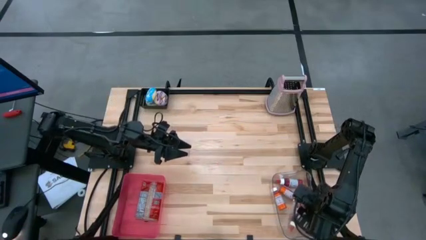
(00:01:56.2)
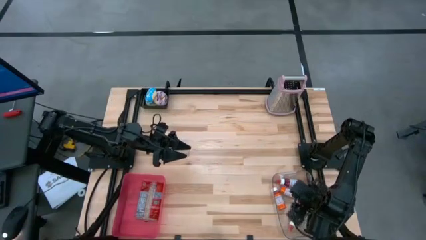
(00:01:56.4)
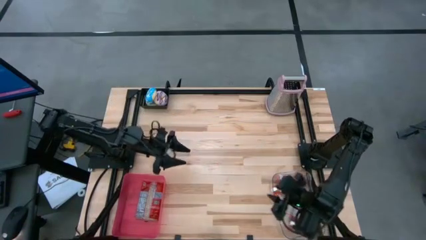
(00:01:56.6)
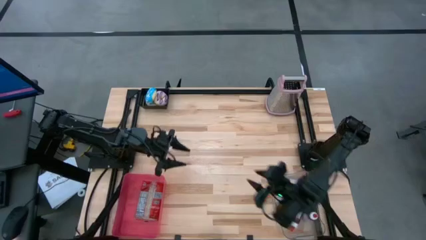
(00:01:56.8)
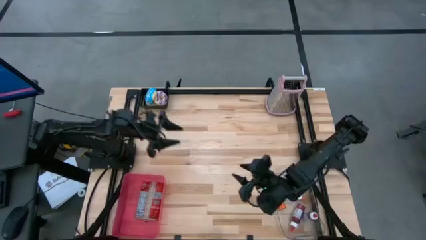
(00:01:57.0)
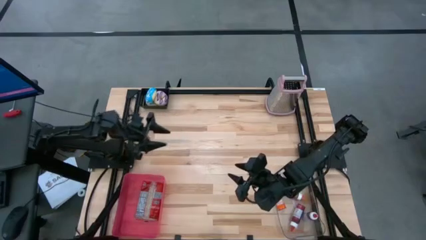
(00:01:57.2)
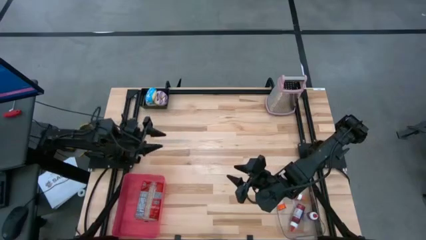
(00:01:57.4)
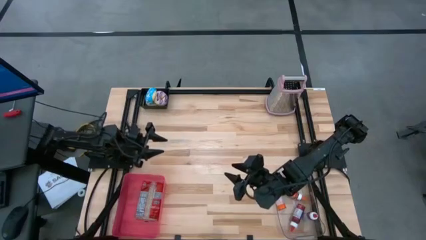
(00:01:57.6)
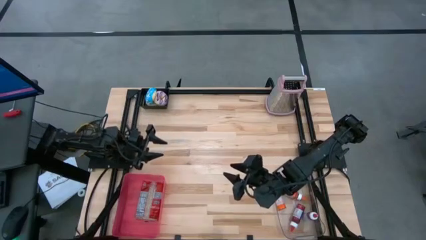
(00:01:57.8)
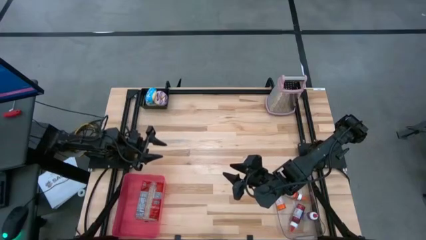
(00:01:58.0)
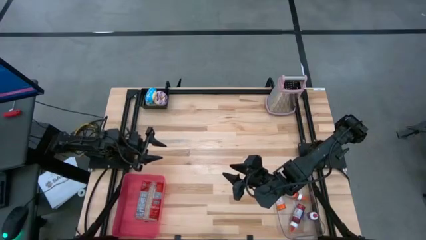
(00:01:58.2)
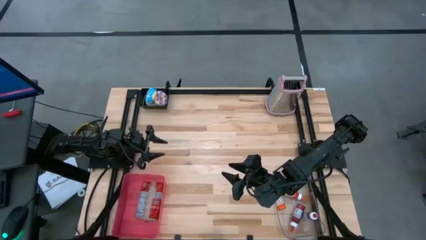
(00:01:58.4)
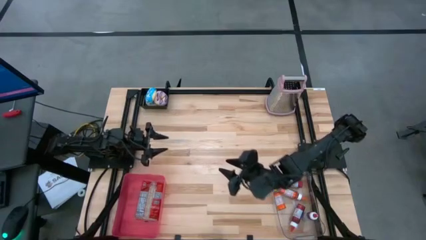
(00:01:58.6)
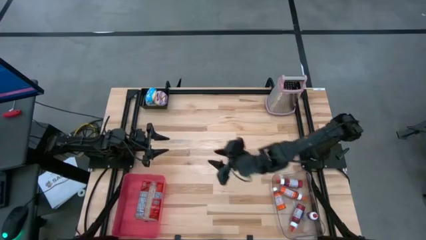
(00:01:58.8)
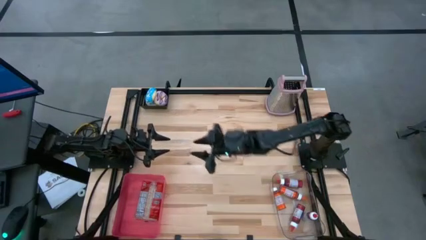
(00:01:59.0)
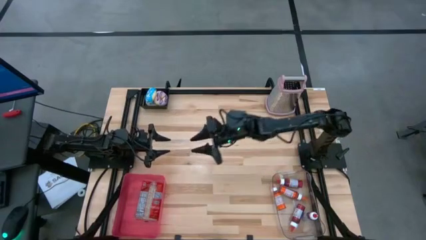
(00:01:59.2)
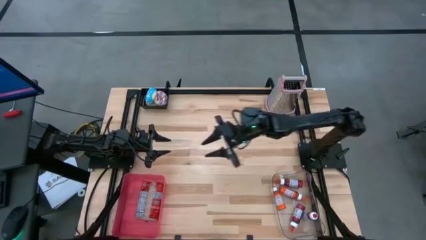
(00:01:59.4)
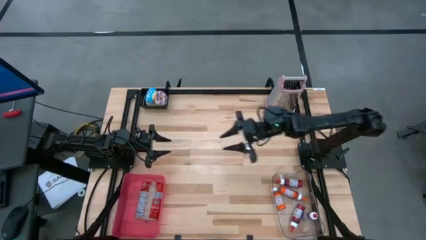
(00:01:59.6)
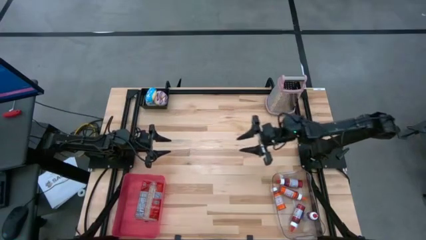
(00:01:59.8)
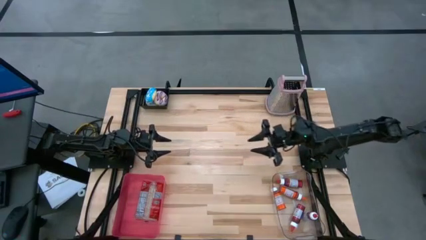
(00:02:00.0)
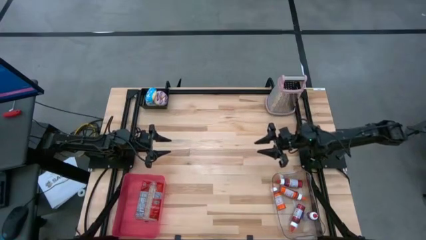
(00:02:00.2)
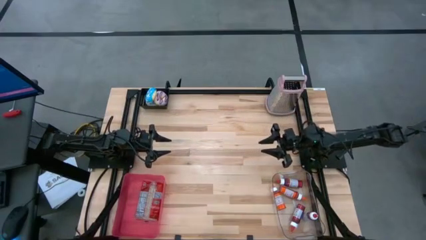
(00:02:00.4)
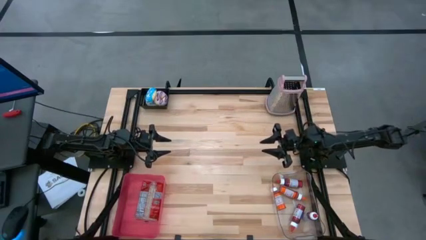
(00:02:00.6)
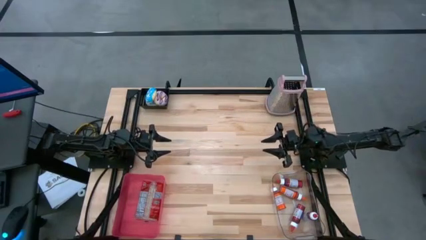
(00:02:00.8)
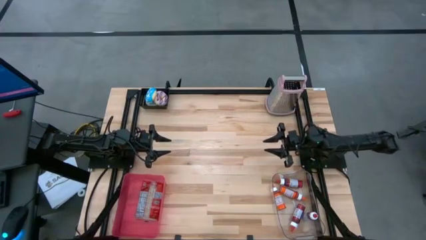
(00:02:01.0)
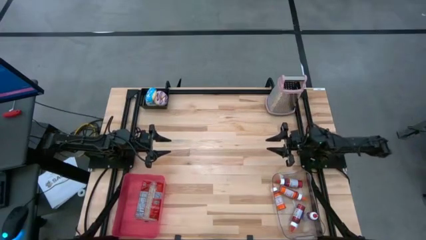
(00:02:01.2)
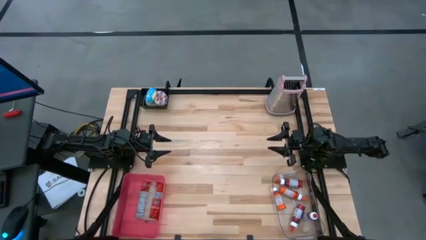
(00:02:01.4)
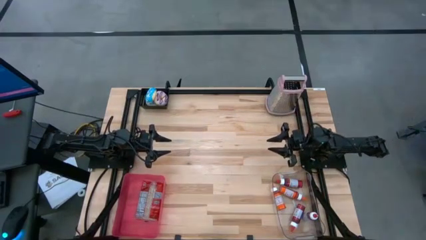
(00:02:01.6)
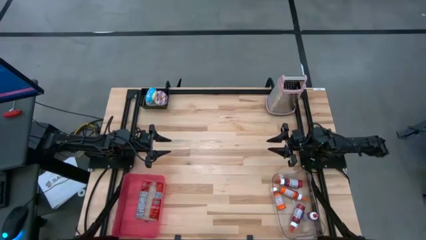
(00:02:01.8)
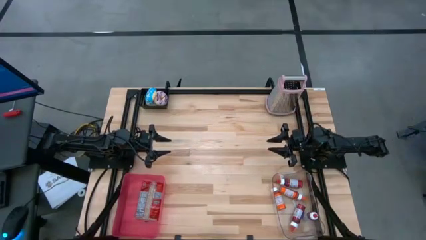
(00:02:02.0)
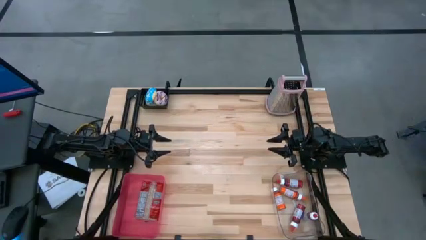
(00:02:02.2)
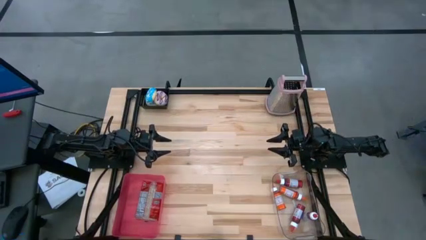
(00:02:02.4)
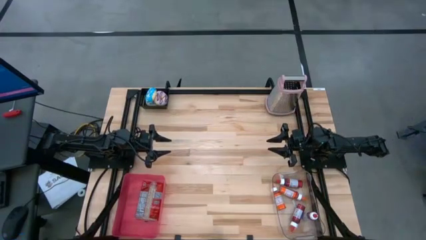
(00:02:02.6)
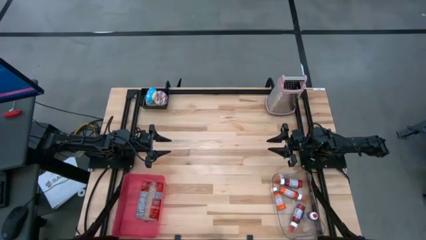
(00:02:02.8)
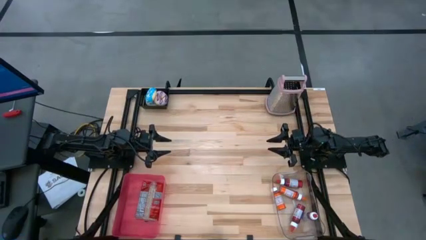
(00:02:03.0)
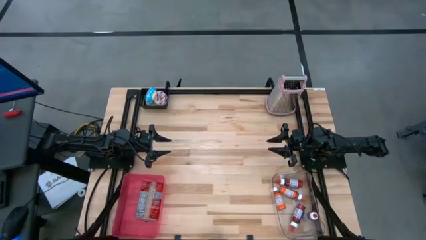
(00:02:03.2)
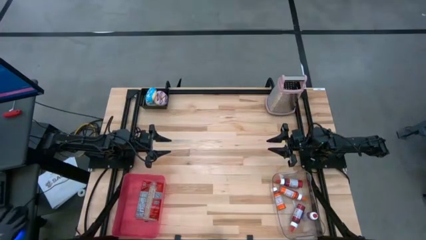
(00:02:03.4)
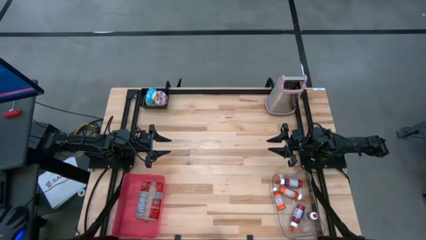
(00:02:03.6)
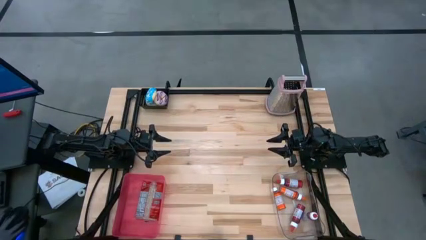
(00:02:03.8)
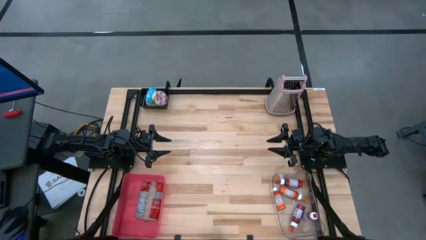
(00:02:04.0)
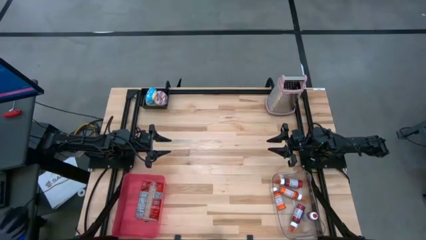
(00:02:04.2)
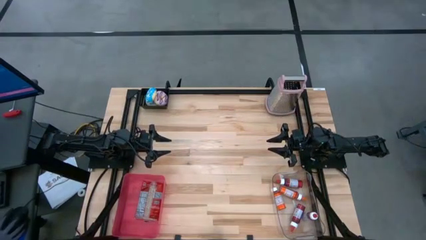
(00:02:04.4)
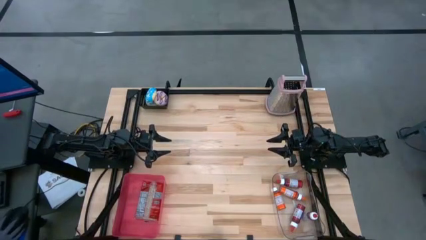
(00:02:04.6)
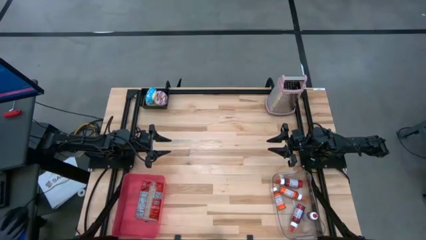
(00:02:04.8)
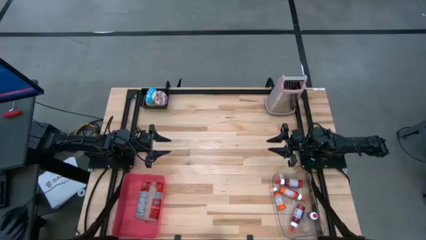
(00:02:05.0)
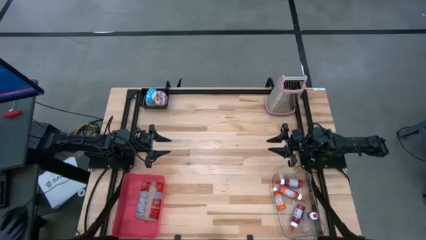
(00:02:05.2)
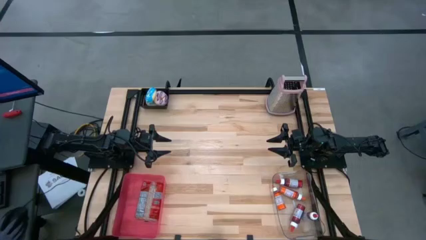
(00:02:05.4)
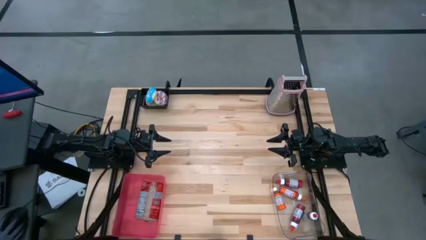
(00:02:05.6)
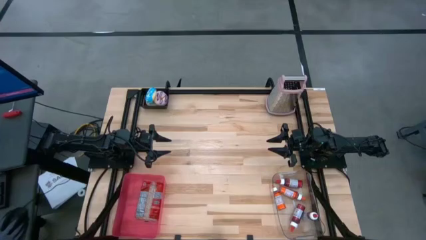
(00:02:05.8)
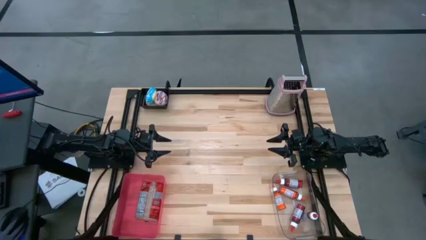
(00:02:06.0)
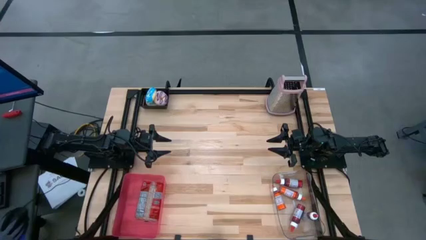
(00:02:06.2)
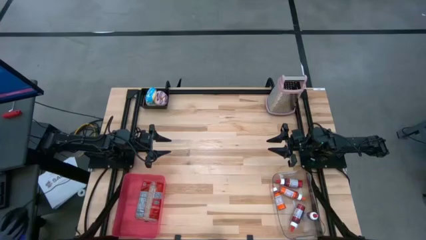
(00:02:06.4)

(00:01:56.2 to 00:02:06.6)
Return to Home Position

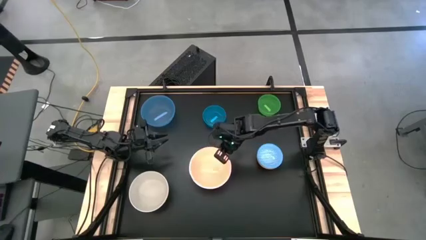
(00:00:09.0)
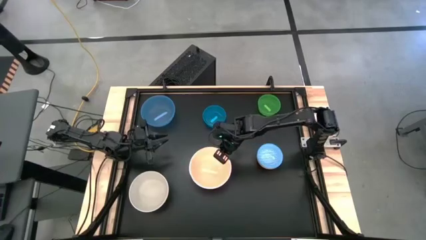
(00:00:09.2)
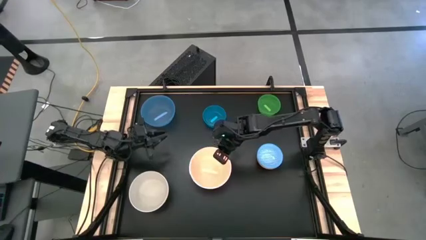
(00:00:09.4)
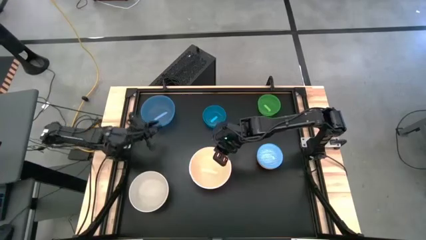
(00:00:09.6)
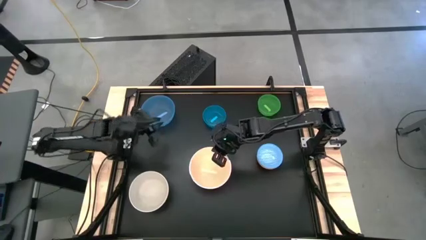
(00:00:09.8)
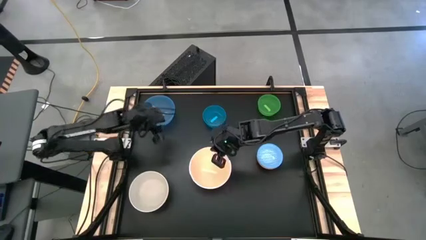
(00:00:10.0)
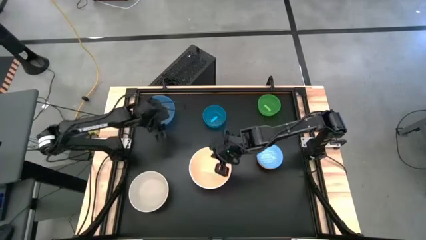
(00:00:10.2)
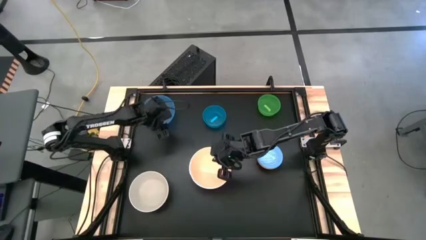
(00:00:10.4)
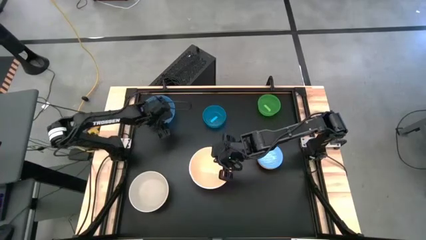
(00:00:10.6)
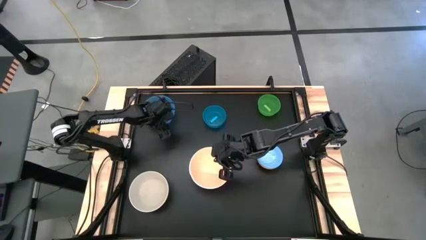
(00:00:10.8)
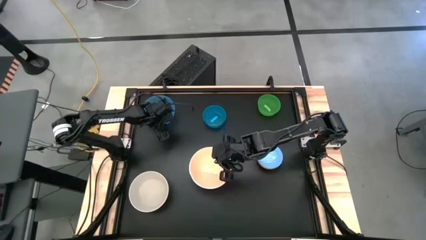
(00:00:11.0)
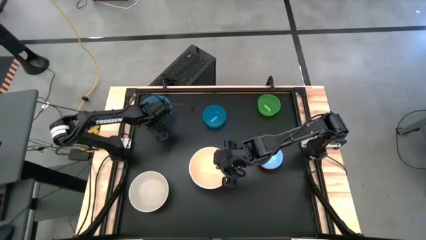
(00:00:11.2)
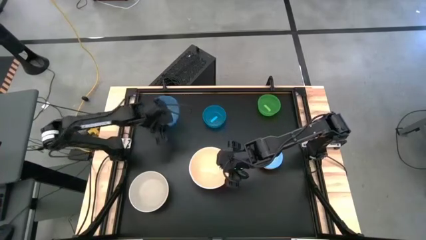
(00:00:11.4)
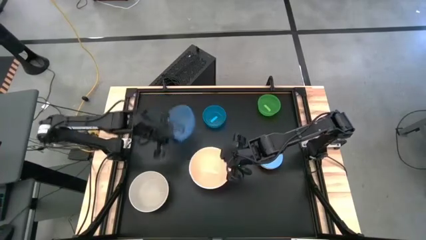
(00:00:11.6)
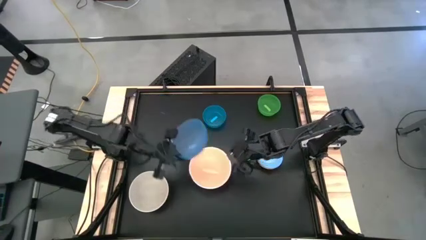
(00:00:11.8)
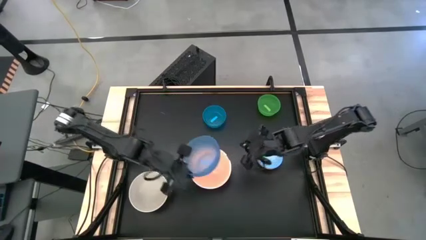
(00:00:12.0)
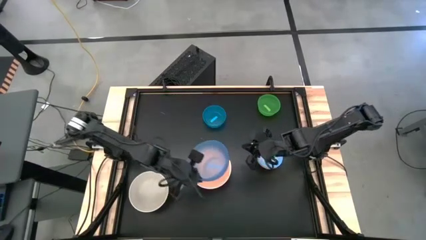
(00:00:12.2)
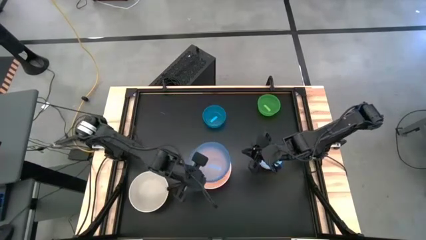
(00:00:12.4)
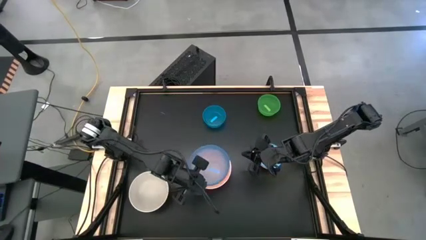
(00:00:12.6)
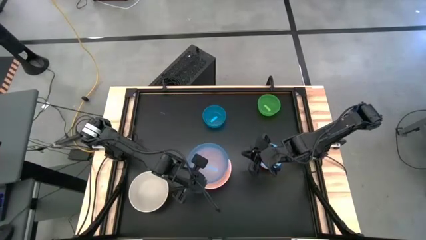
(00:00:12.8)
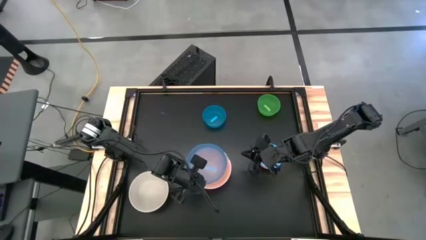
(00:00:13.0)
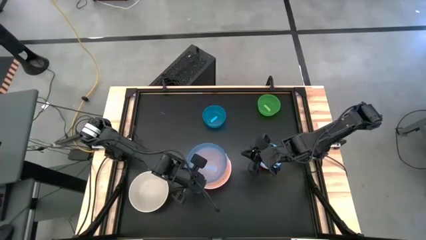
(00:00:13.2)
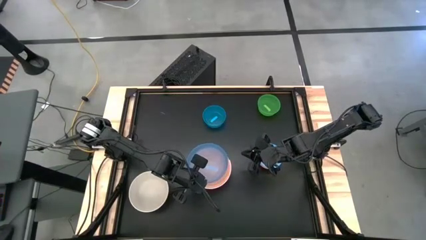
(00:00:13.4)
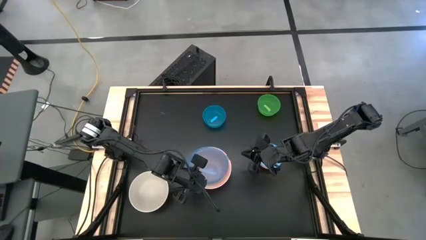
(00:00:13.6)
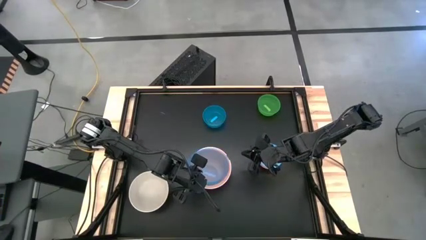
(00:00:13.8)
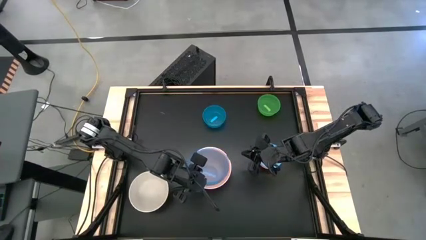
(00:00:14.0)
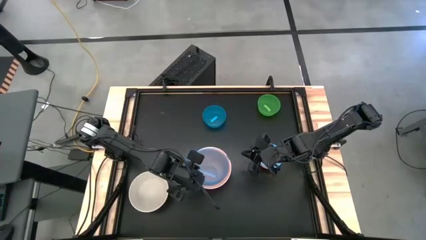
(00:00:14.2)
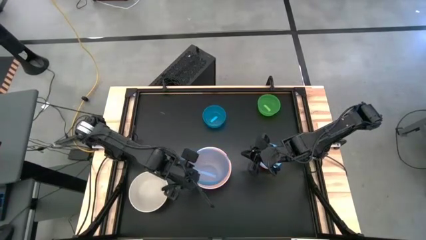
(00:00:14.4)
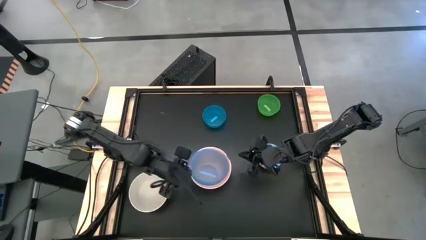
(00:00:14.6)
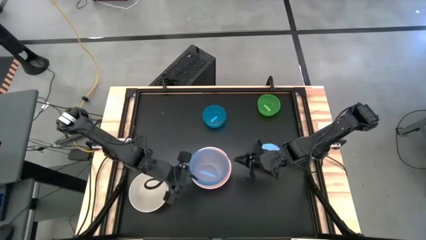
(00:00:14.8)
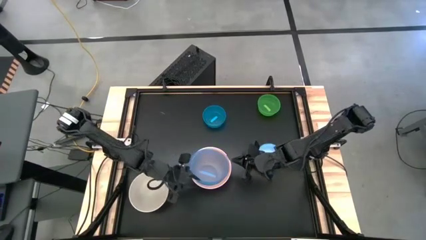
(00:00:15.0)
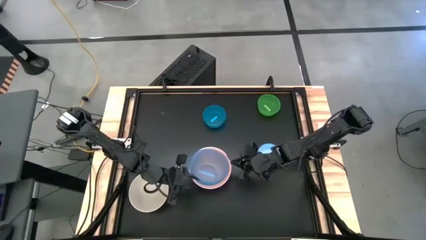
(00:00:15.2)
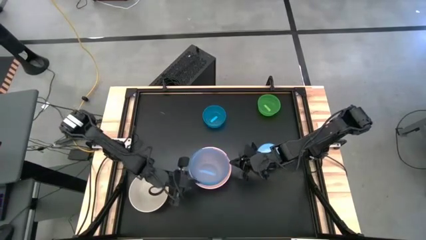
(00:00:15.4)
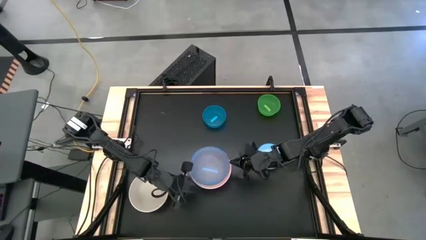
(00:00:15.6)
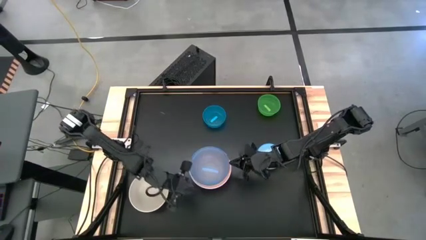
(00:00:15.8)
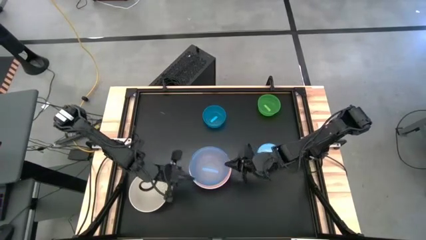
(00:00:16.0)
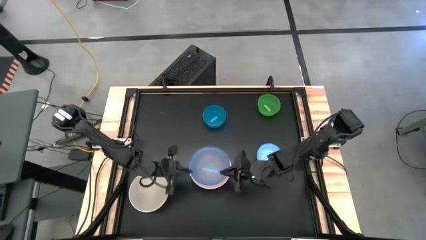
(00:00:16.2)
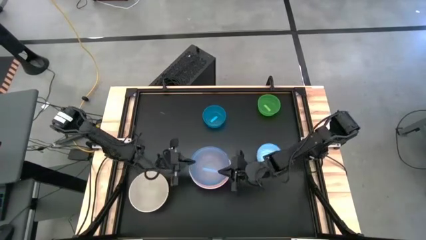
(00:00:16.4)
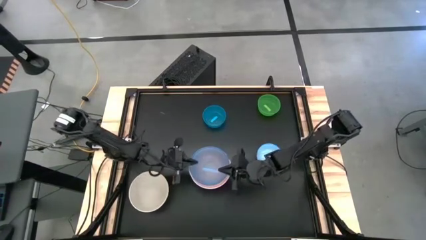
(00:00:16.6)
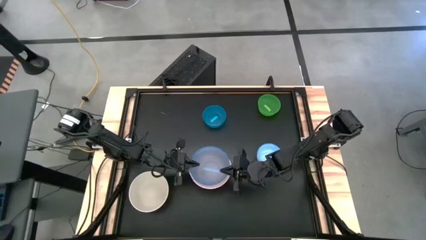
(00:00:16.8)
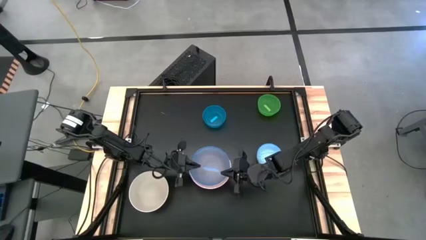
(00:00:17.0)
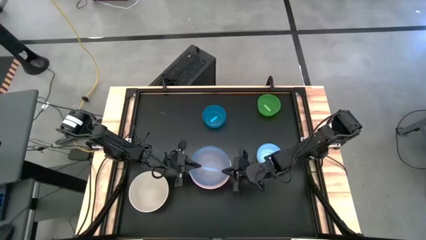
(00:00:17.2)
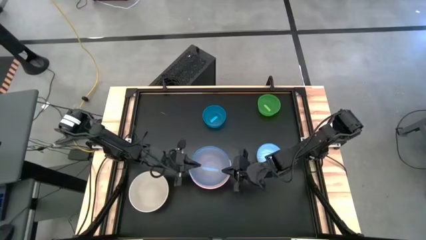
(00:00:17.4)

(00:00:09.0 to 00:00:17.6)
Stack the left transparent blue bowl into the light orange bowl
